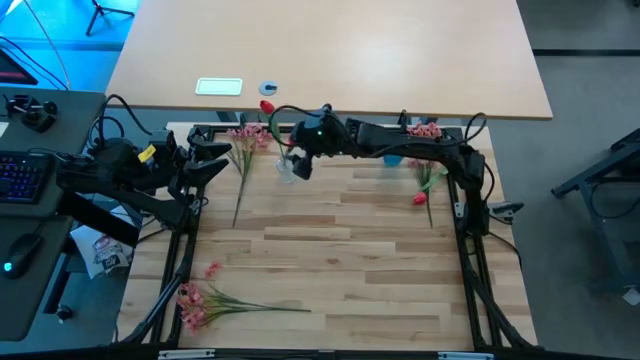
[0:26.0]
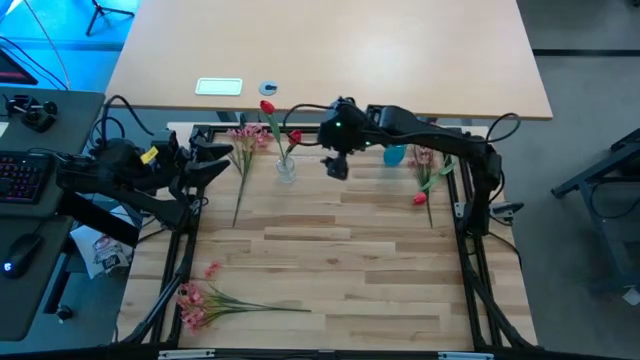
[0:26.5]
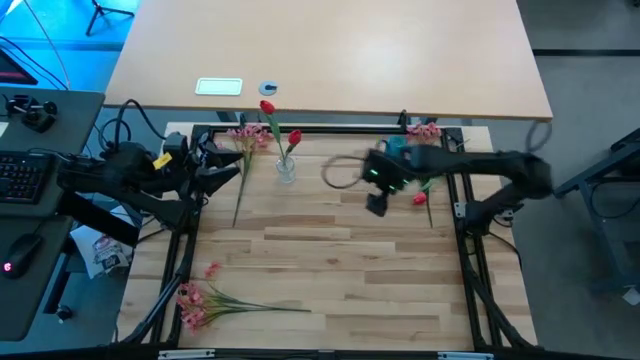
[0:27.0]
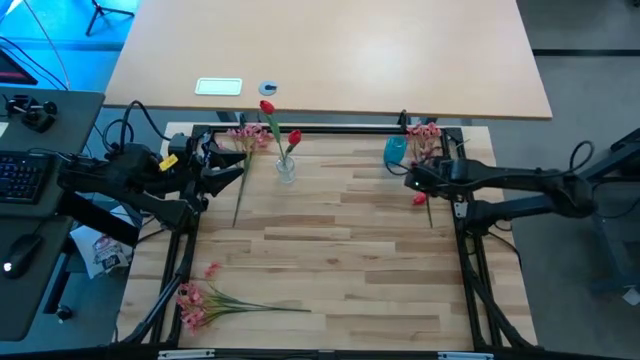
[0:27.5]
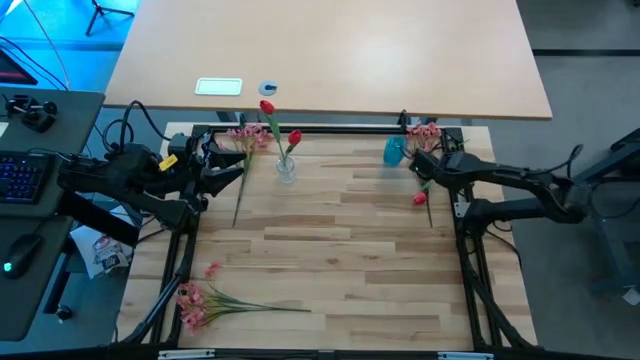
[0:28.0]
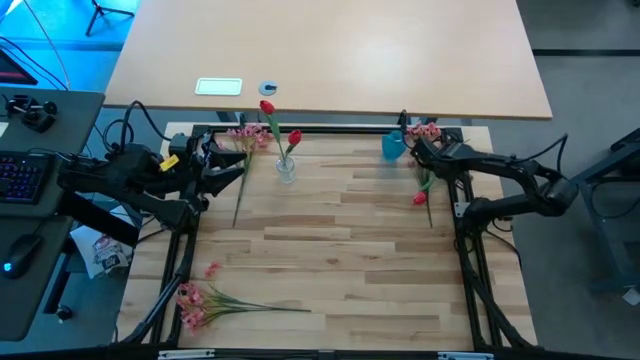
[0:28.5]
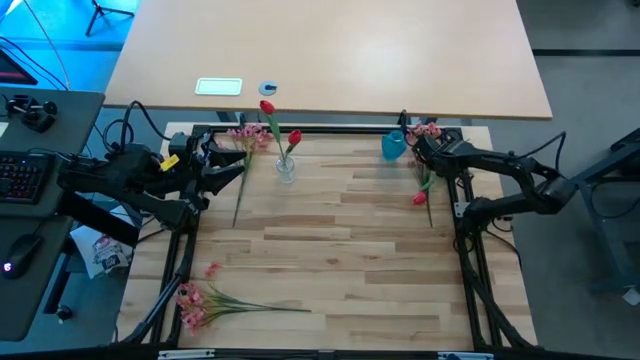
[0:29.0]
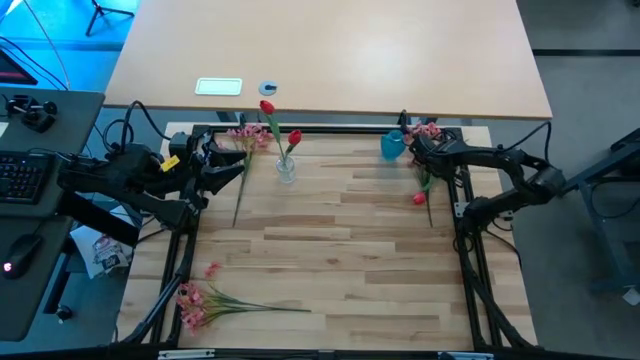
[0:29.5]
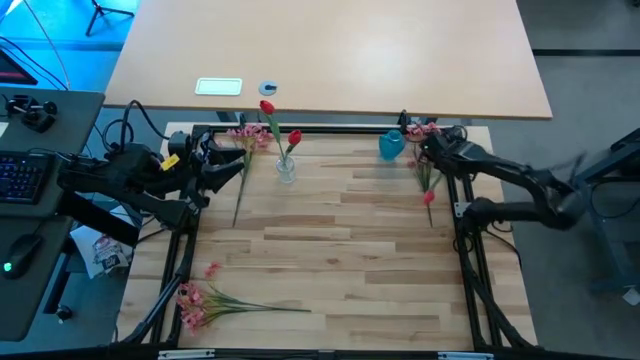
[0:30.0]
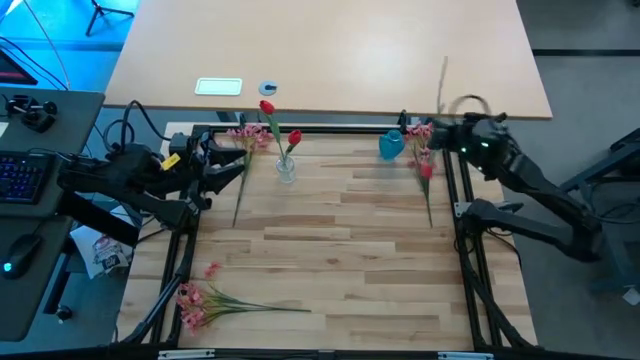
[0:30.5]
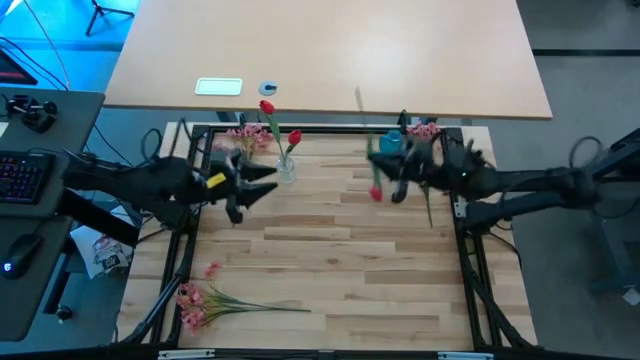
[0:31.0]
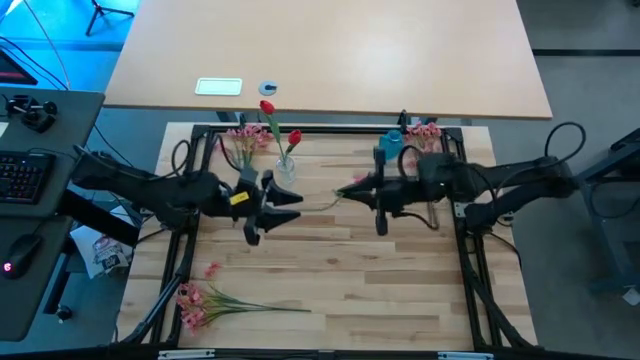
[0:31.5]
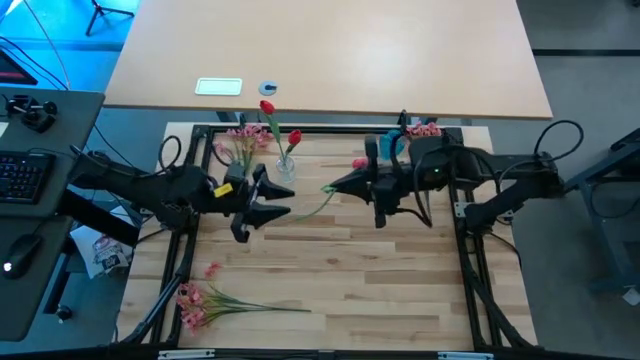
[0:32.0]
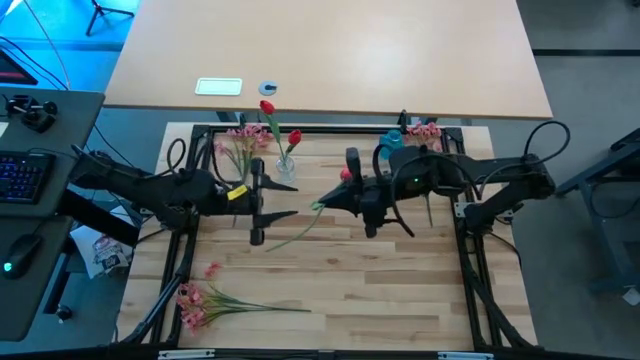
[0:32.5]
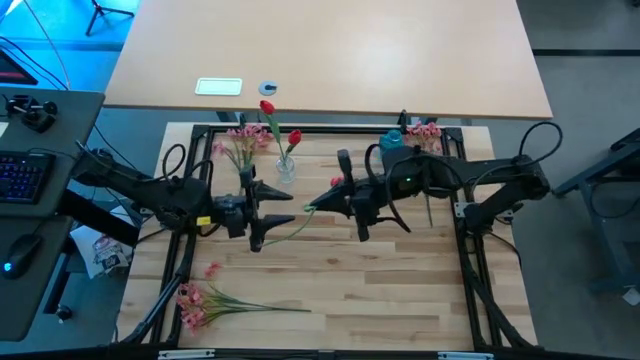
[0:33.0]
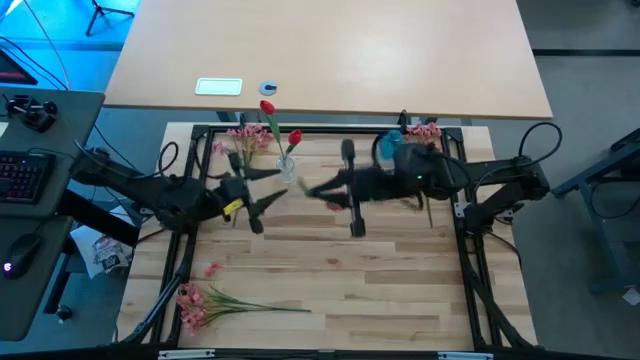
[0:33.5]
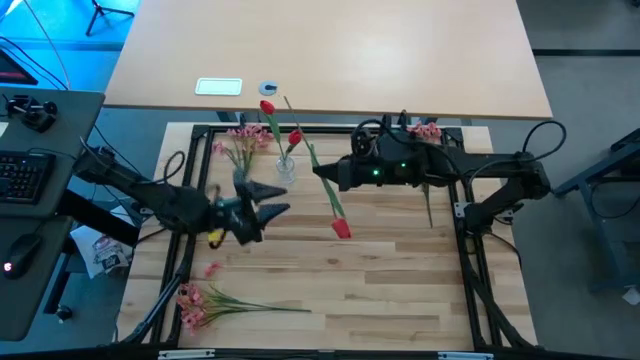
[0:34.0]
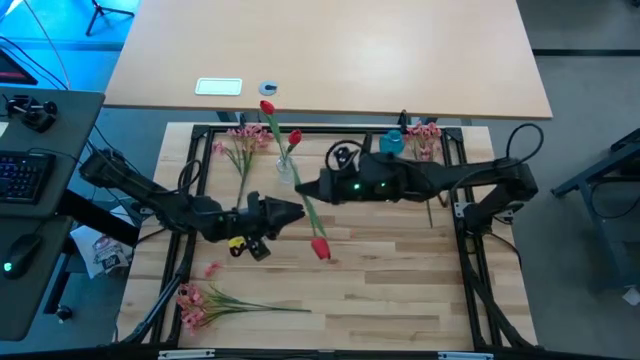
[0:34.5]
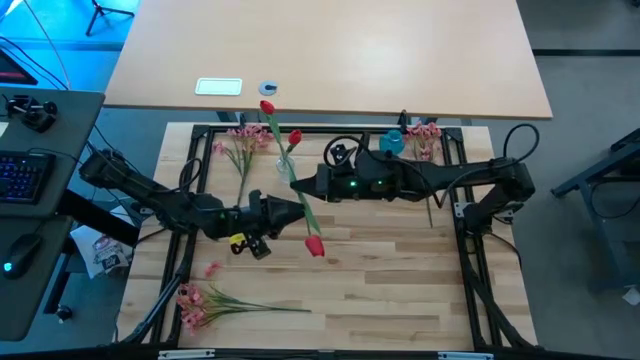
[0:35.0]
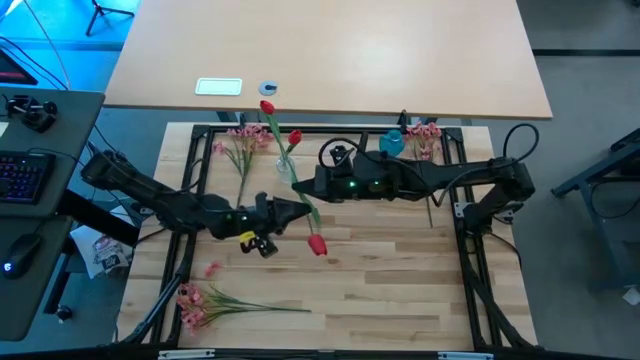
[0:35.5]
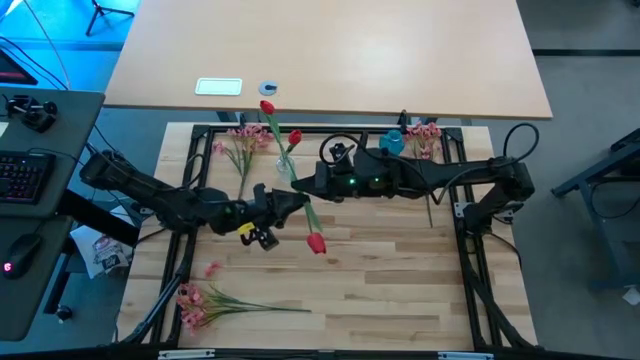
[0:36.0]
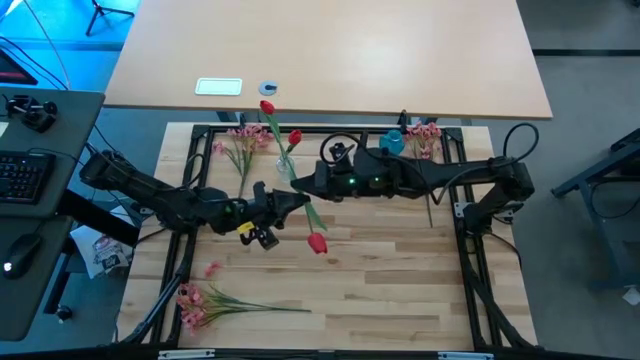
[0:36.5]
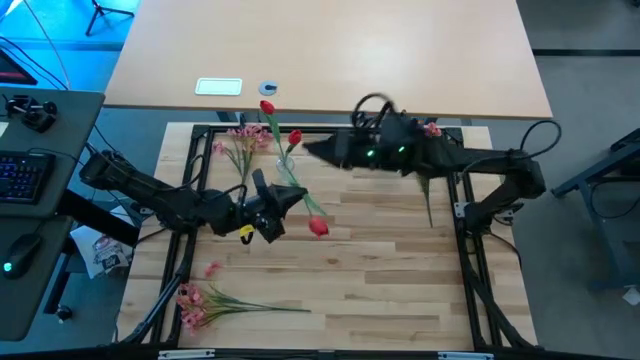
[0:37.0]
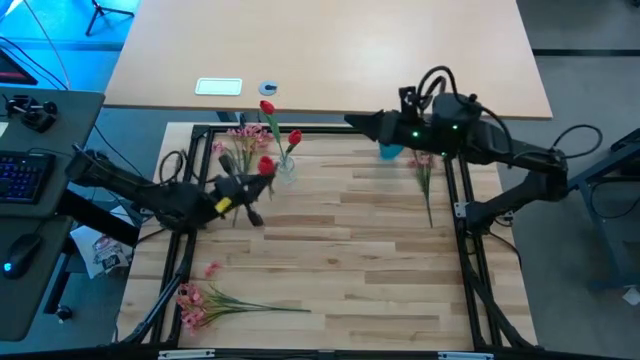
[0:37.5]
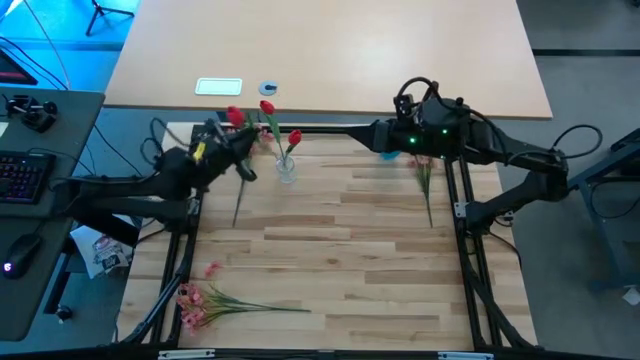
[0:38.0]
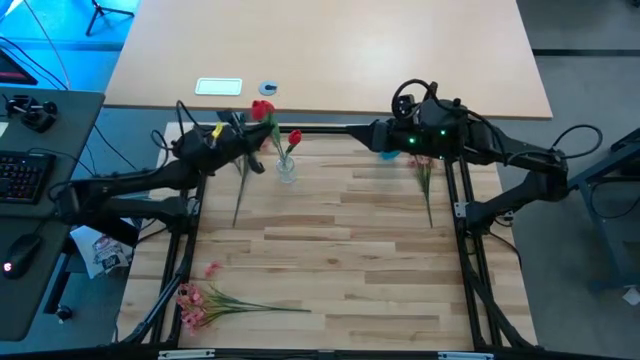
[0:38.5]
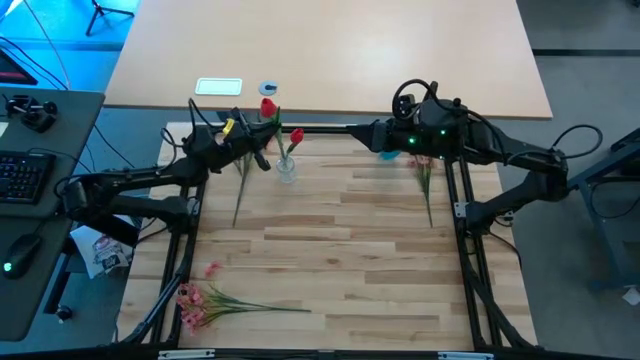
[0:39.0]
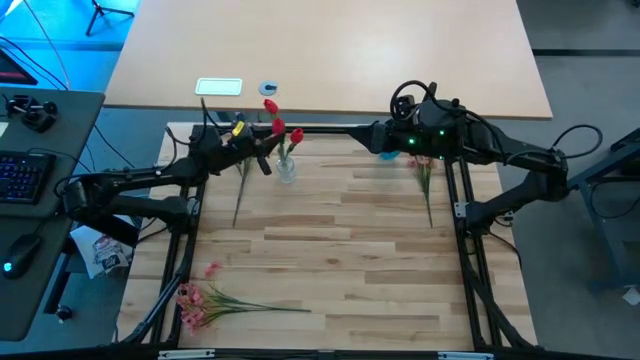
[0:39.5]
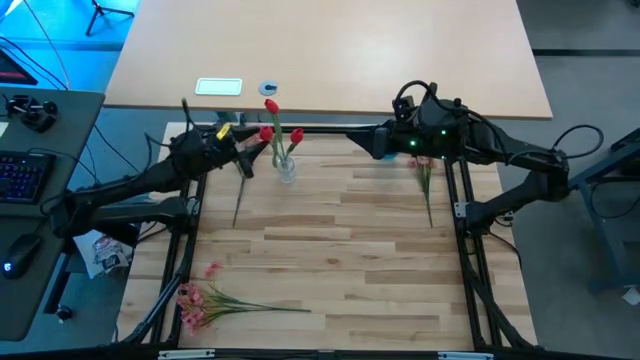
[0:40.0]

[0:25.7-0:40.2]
Task: Sort flowers into vase by color
Put the red flower into the transparent vase

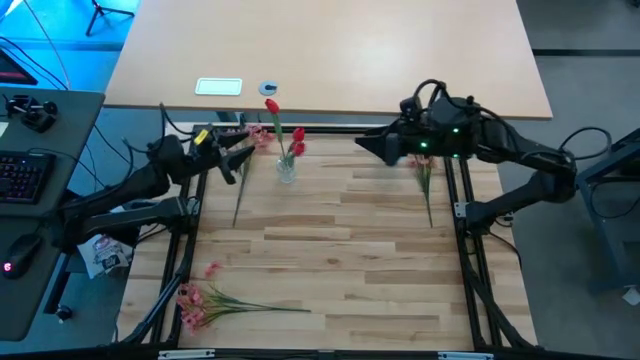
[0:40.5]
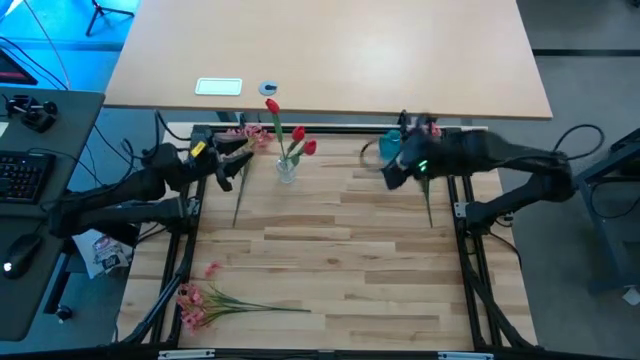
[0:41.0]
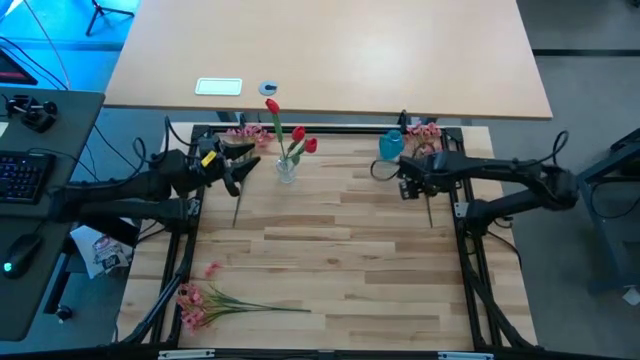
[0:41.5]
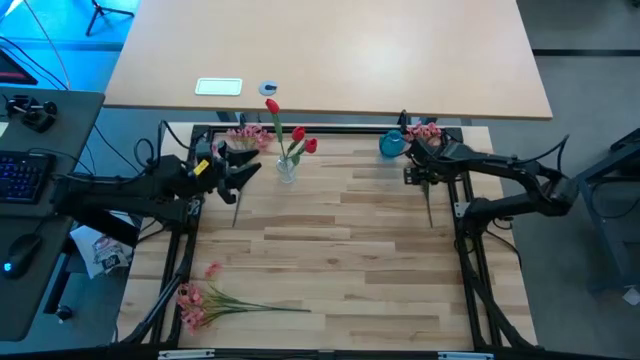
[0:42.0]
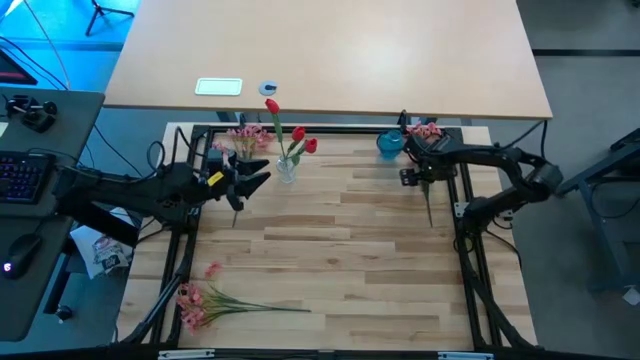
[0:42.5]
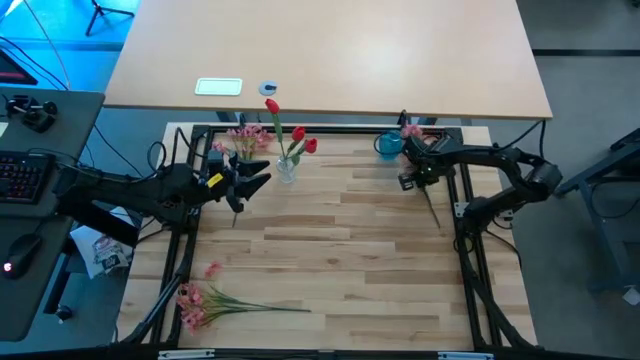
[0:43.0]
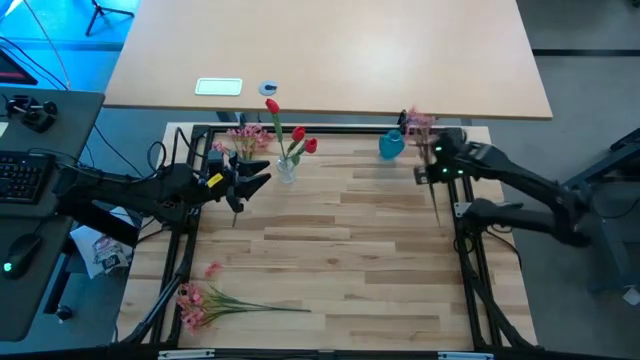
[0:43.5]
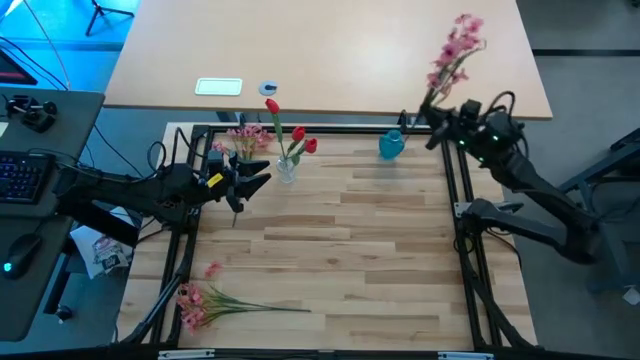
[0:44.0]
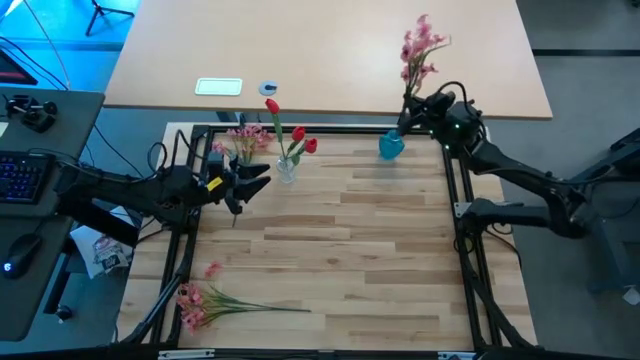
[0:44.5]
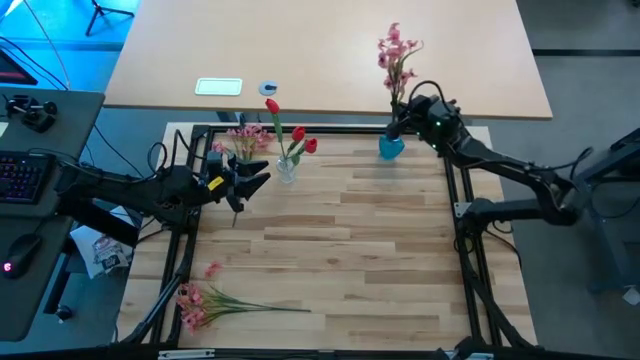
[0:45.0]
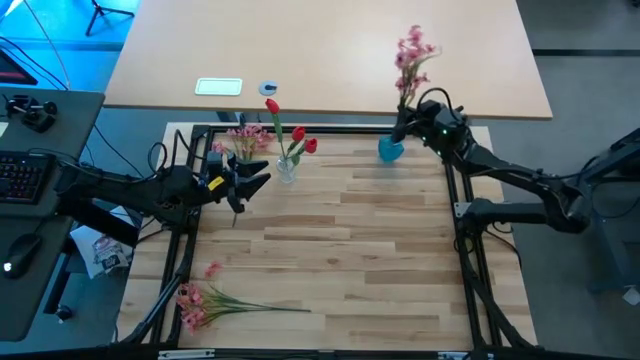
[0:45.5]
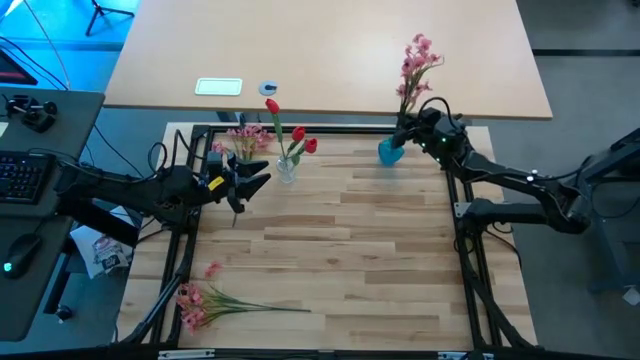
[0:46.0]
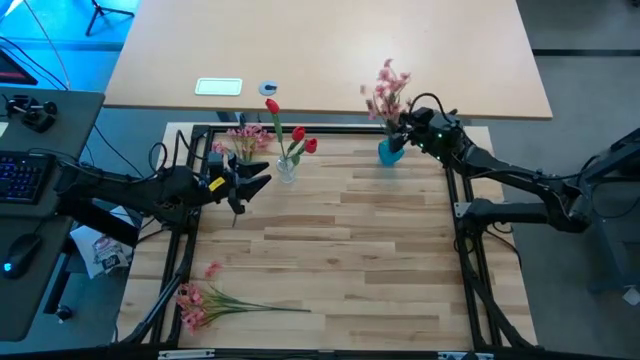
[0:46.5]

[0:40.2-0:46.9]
Put the right pink flowers into the blue vase
